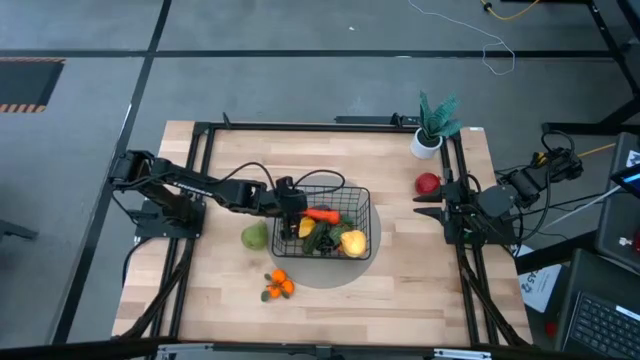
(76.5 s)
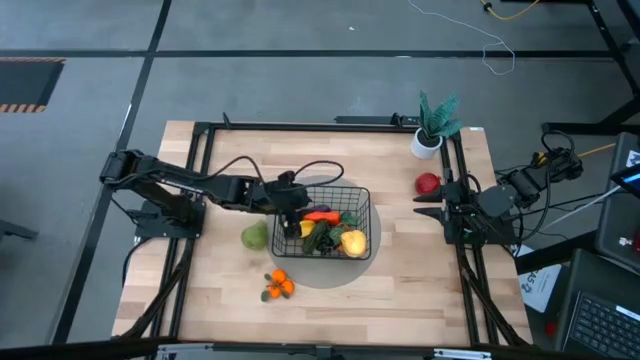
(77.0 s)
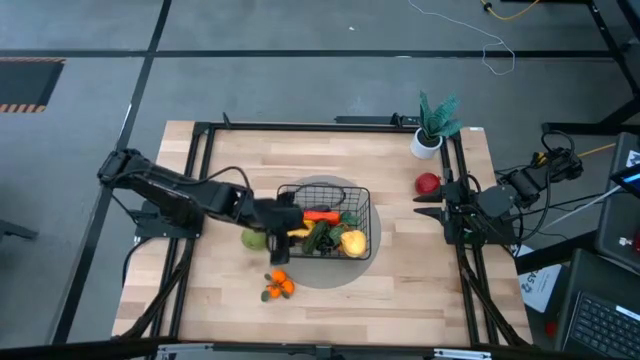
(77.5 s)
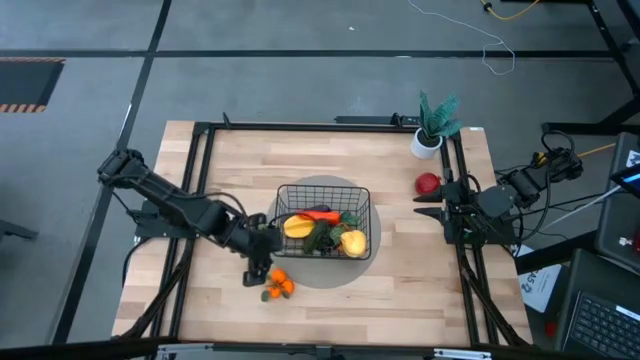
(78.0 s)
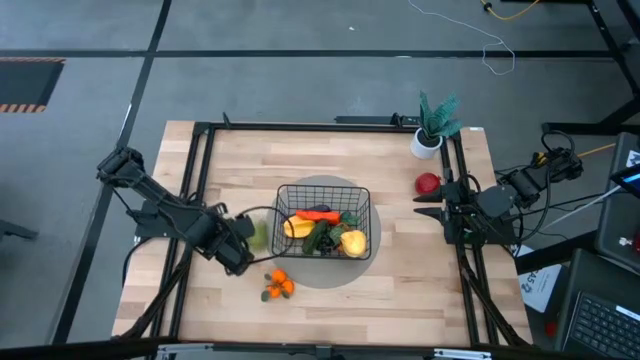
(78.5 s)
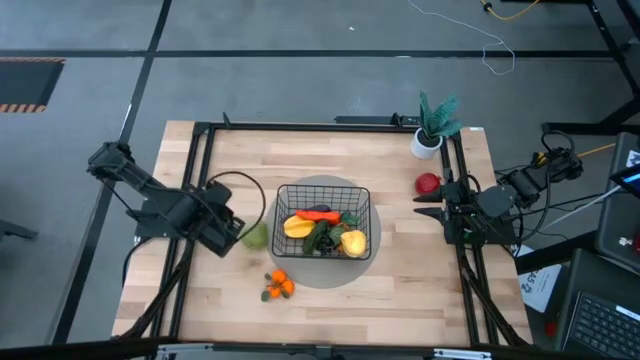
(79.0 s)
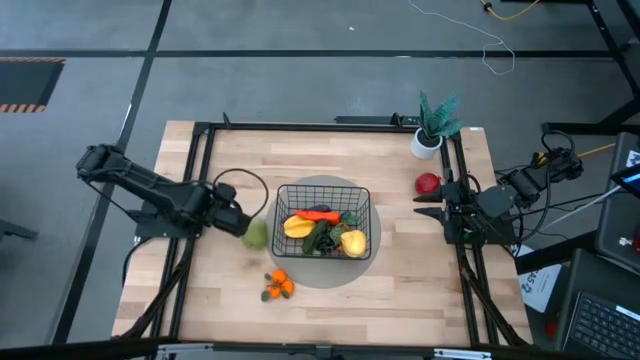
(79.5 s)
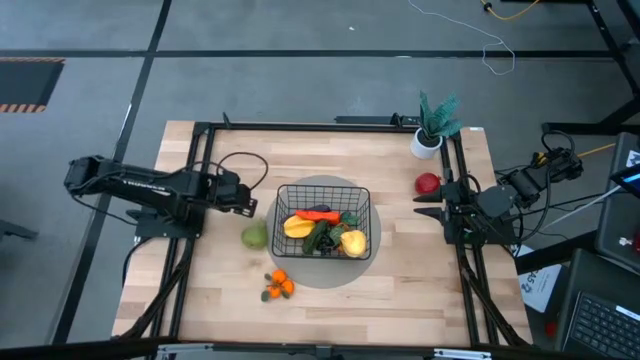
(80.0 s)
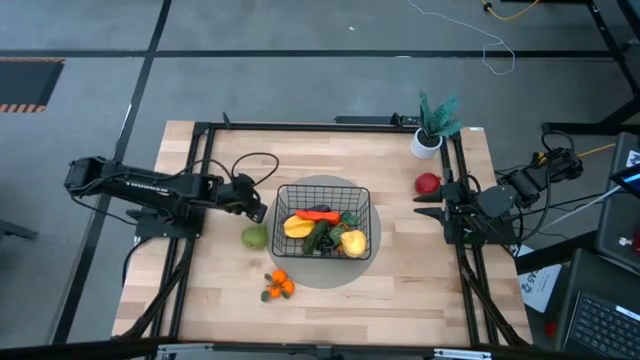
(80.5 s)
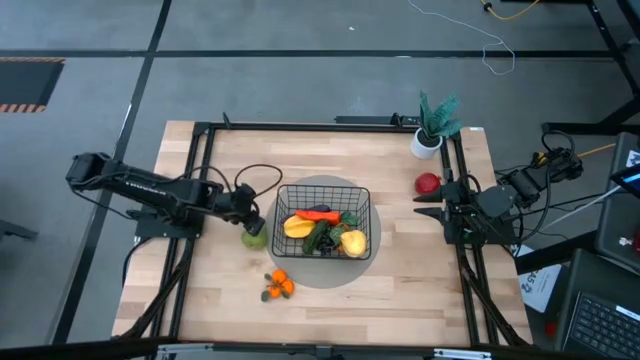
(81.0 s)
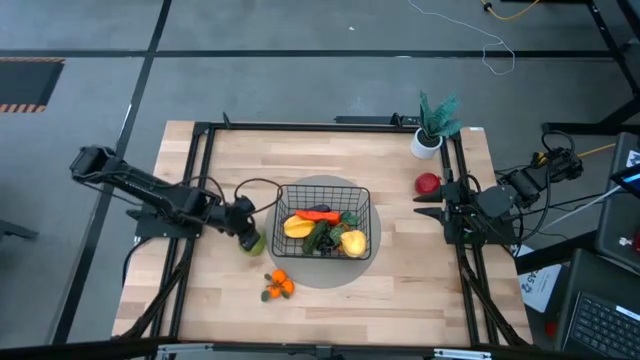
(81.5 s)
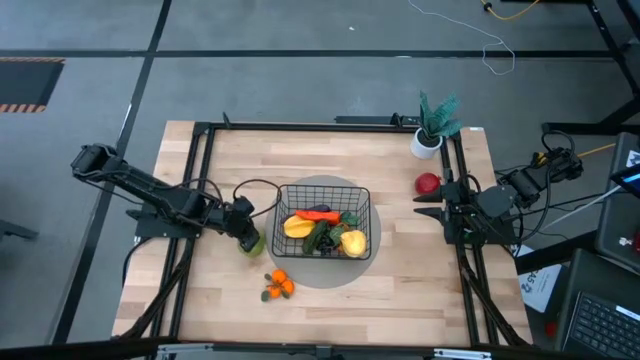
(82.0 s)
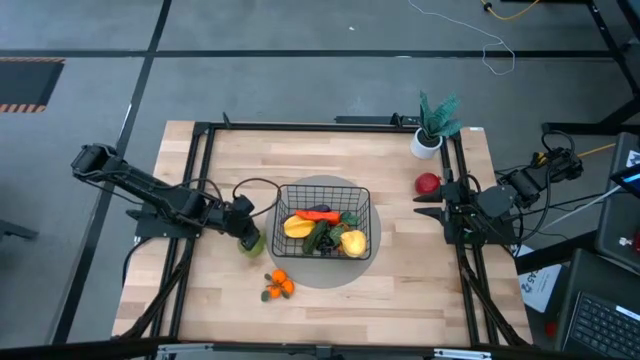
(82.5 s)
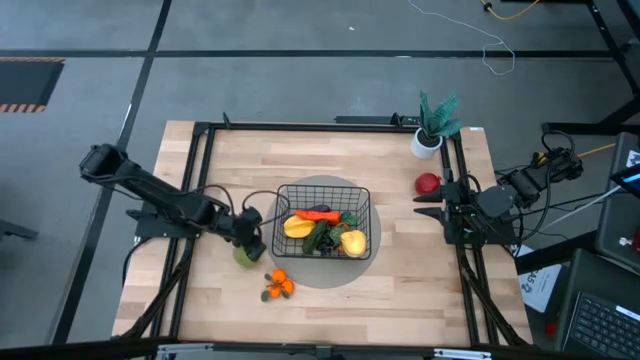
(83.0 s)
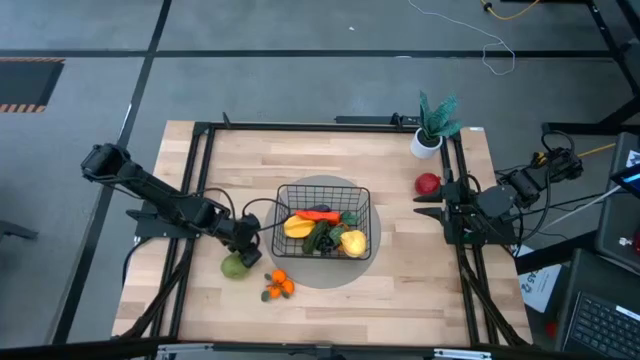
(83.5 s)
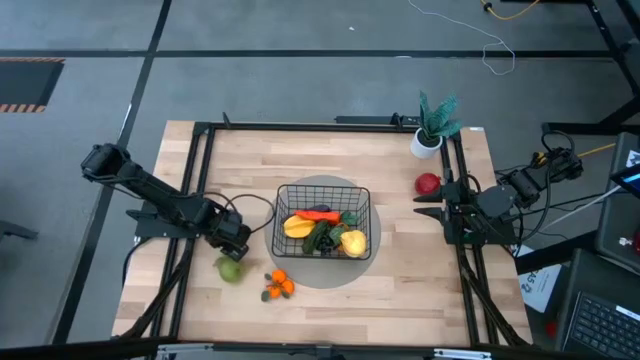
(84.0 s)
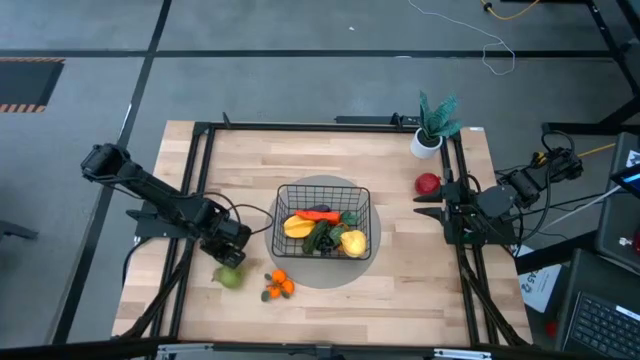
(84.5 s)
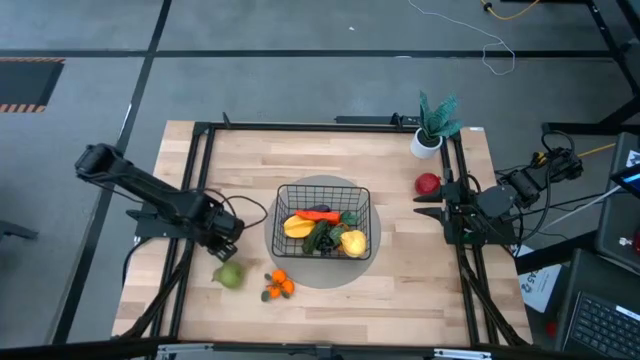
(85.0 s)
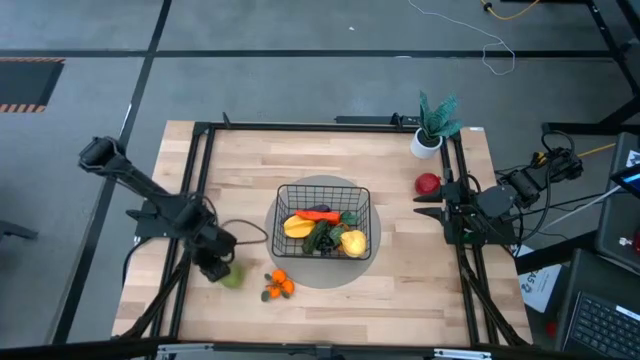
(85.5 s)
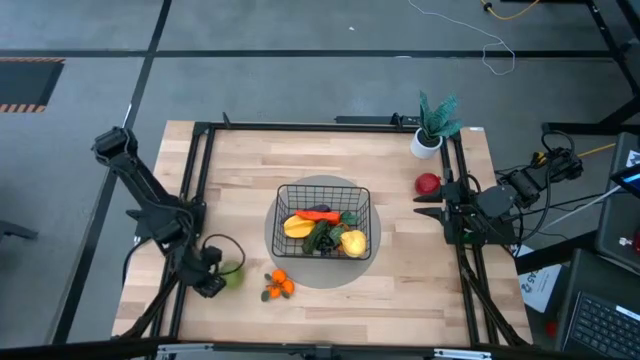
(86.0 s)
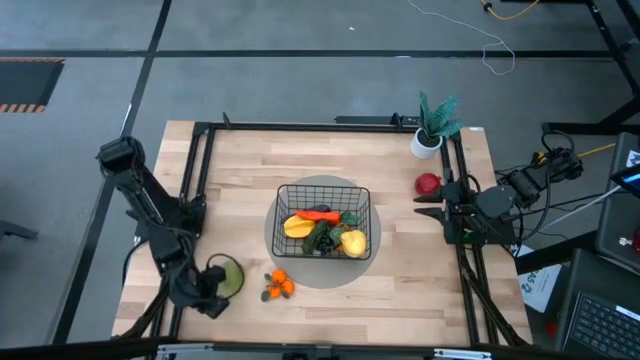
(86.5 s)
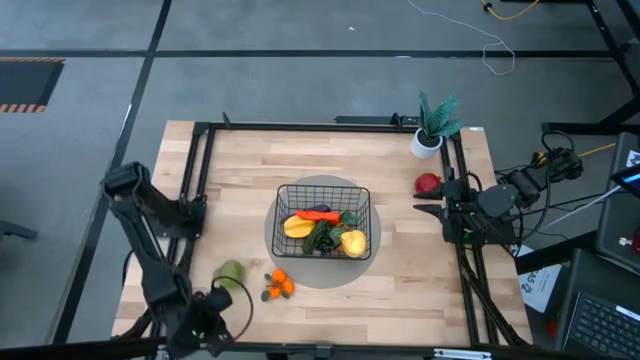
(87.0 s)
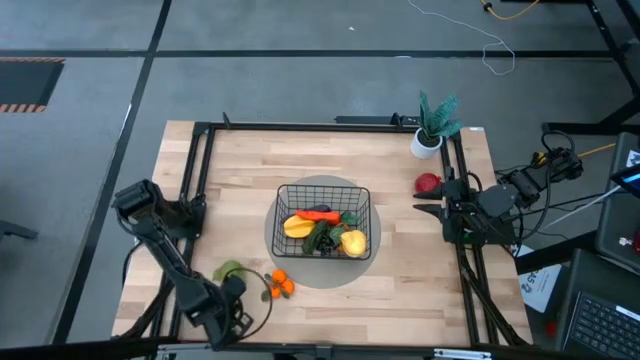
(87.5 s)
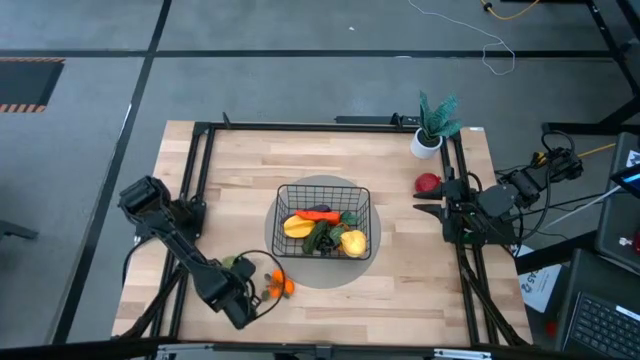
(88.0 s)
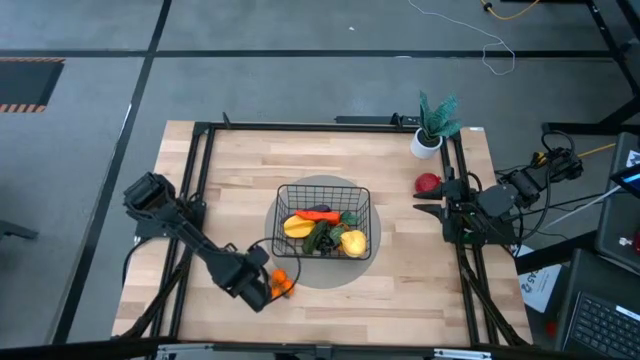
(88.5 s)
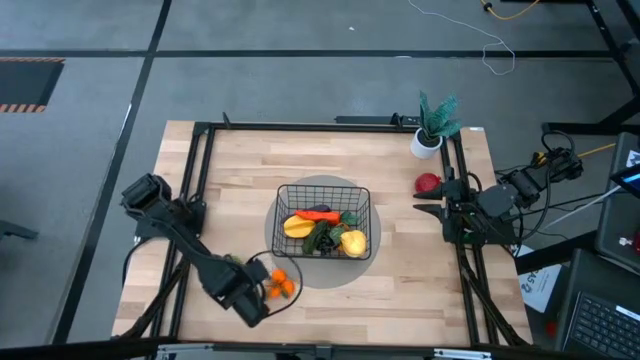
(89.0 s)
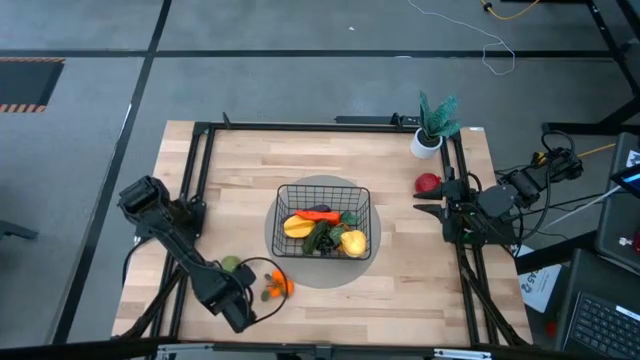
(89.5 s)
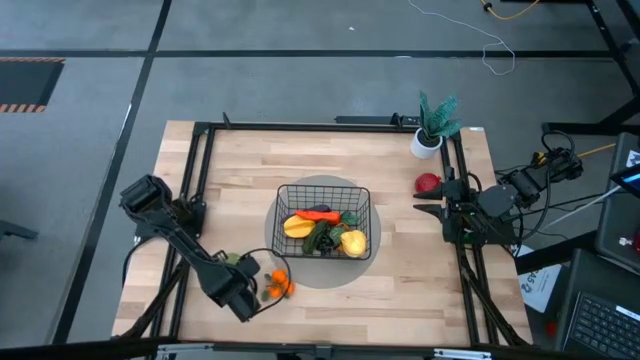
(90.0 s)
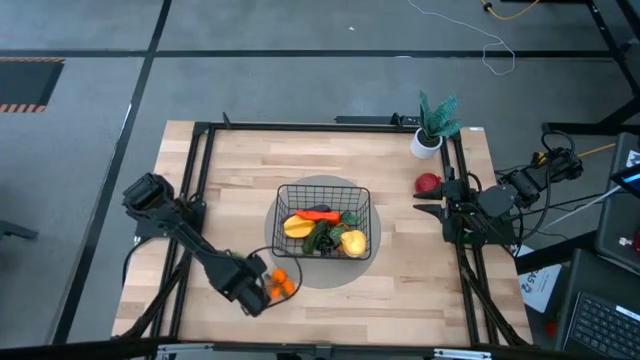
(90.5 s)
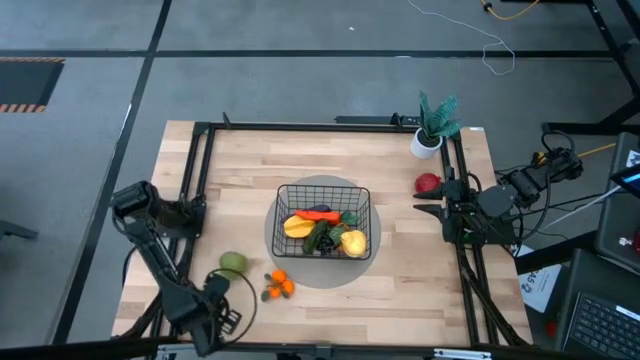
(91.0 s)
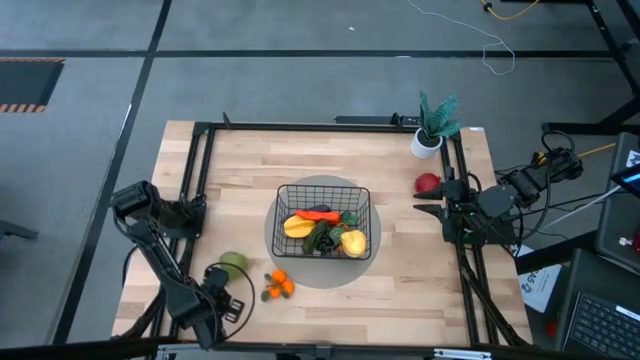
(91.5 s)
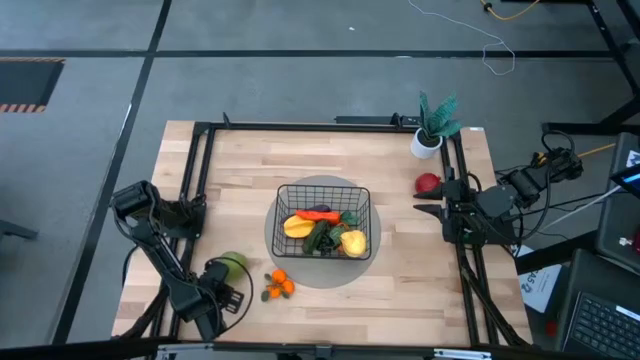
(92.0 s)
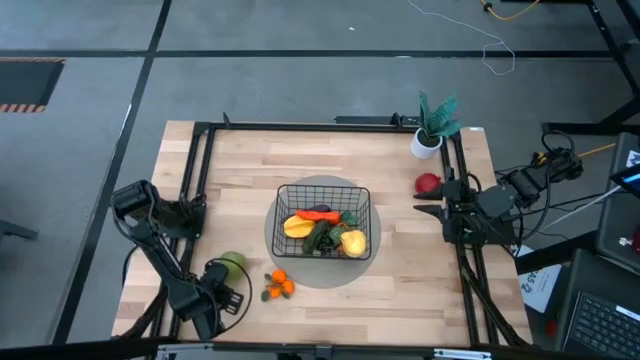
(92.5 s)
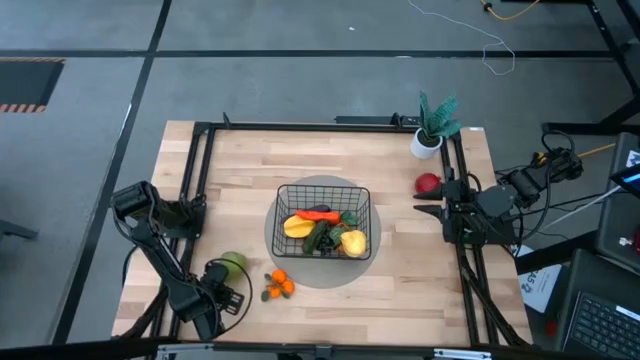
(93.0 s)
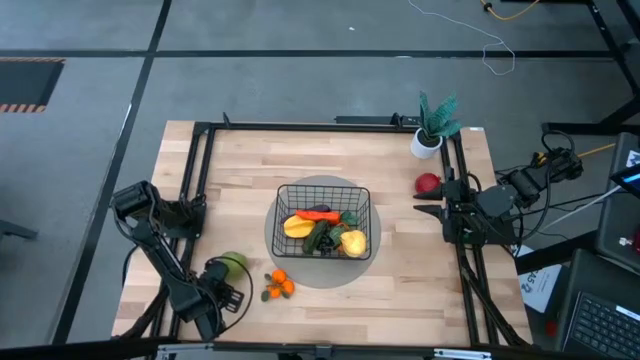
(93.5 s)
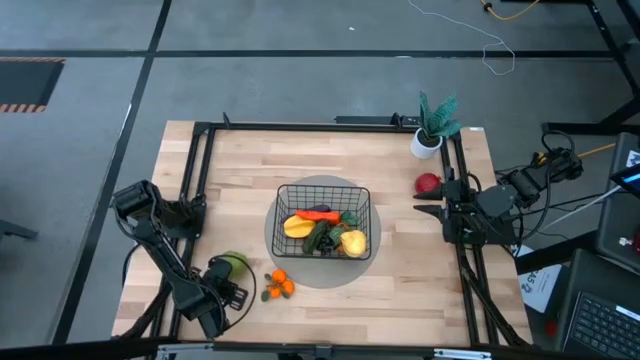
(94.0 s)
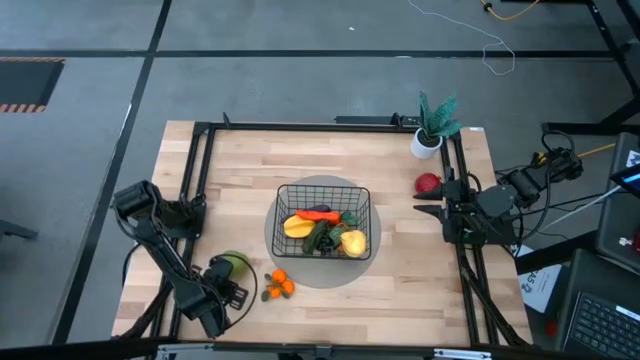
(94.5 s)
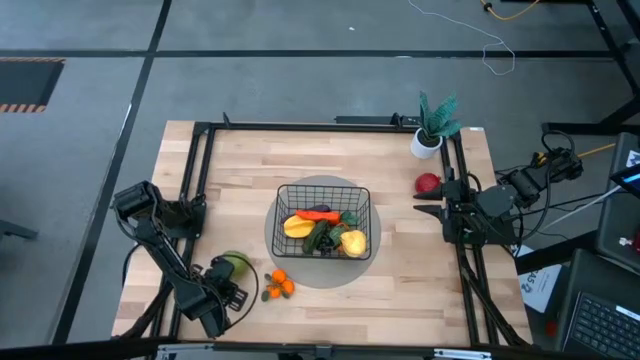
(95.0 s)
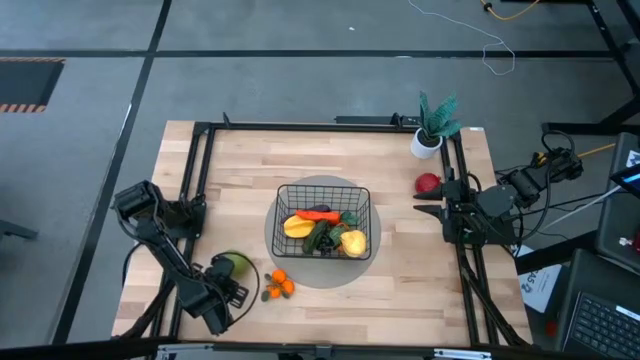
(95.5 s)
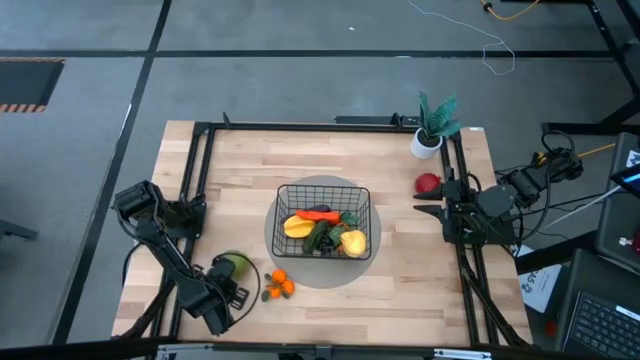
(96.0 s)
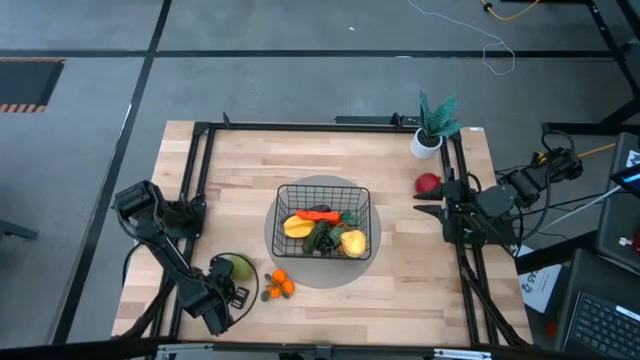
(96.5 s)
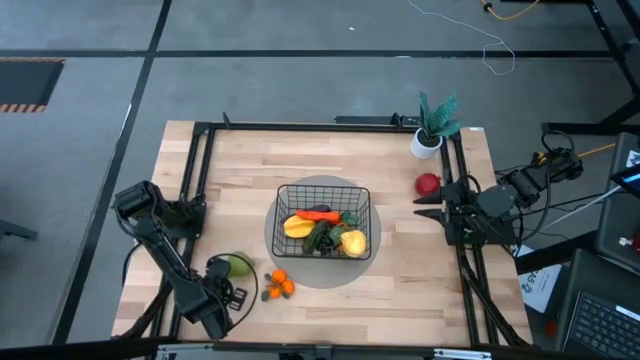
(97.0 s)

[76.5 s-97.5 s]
Task: Build produce basket
Put the green pear into the black wire basket
